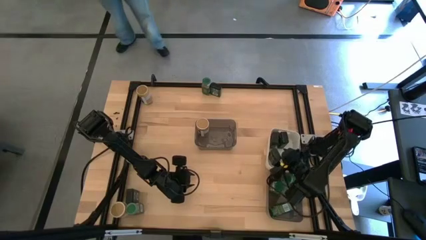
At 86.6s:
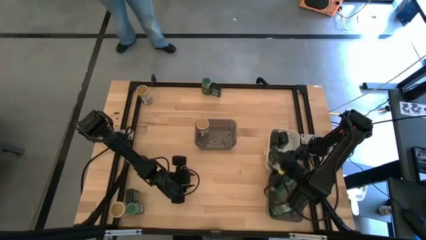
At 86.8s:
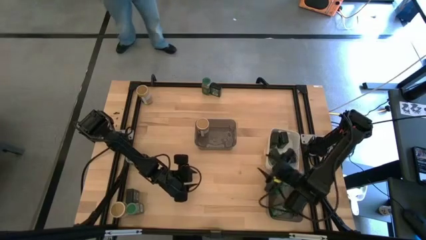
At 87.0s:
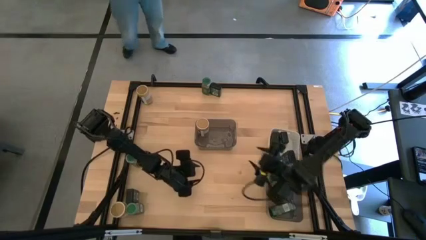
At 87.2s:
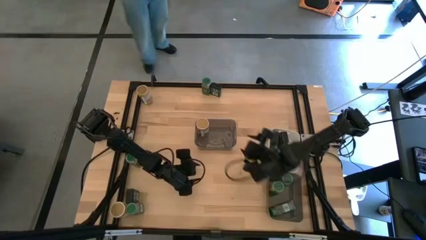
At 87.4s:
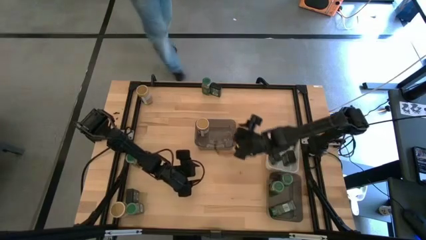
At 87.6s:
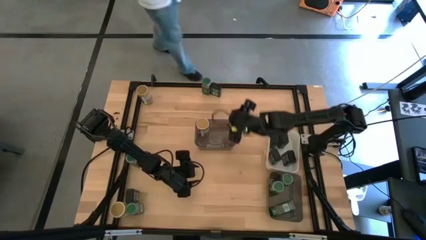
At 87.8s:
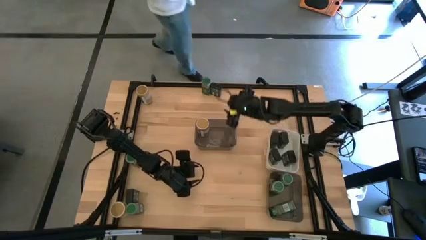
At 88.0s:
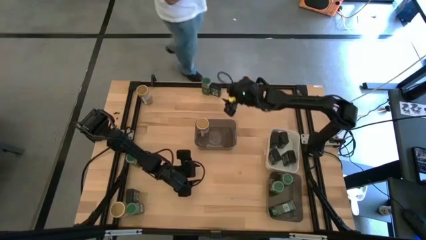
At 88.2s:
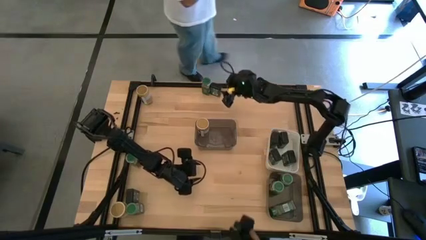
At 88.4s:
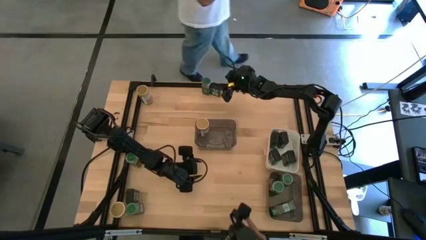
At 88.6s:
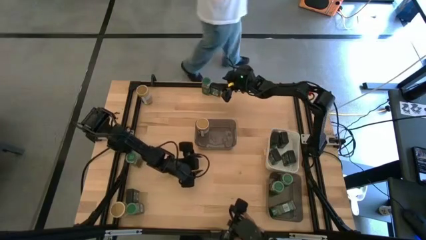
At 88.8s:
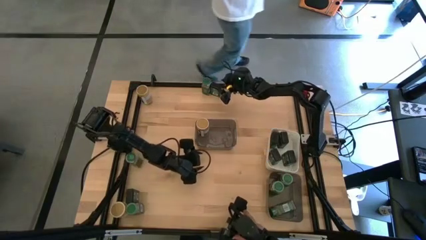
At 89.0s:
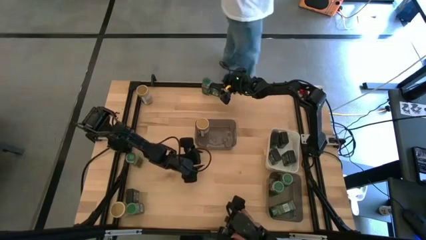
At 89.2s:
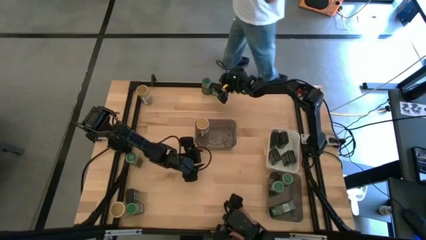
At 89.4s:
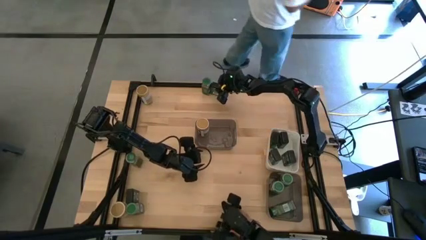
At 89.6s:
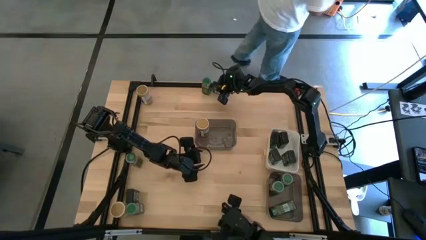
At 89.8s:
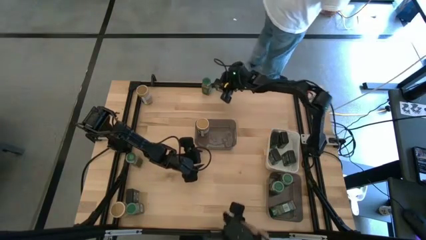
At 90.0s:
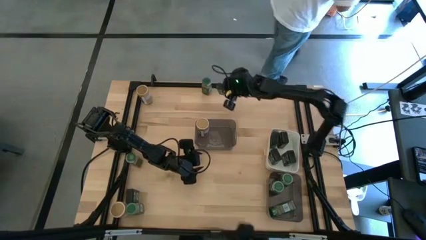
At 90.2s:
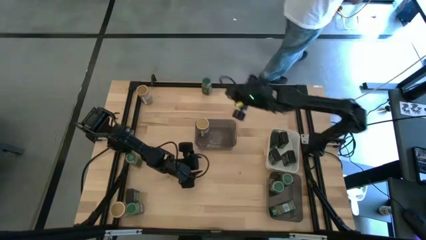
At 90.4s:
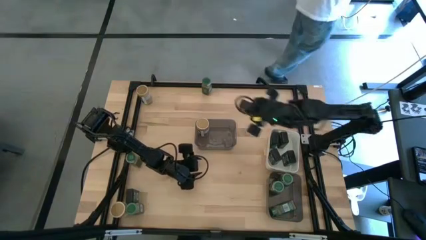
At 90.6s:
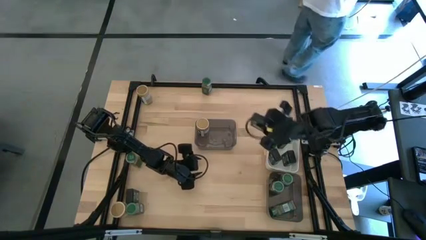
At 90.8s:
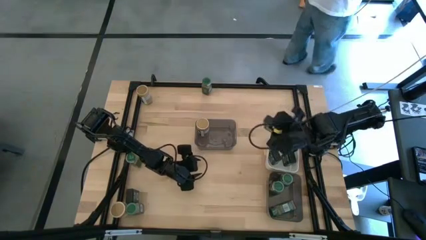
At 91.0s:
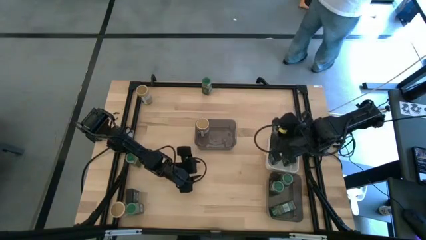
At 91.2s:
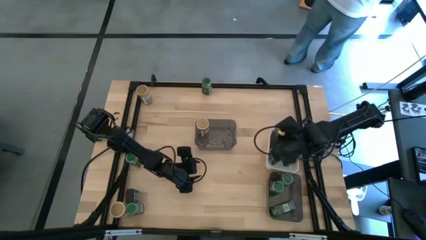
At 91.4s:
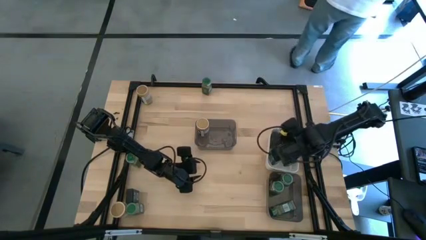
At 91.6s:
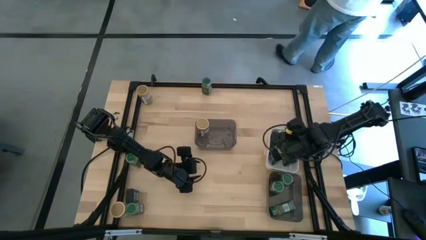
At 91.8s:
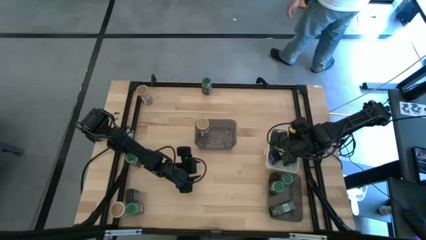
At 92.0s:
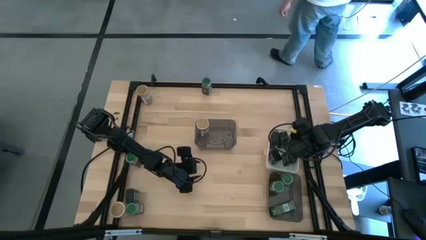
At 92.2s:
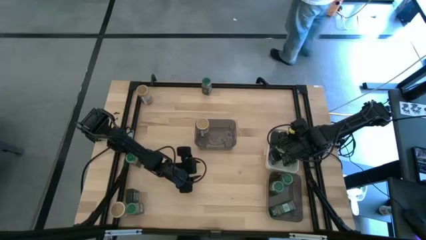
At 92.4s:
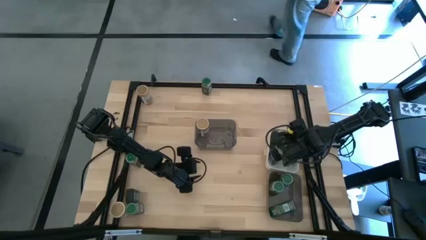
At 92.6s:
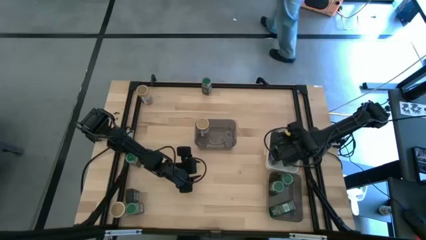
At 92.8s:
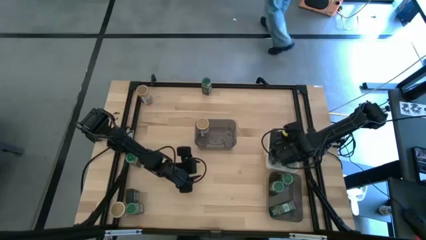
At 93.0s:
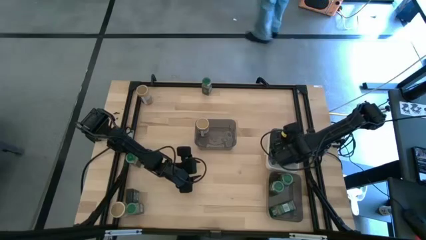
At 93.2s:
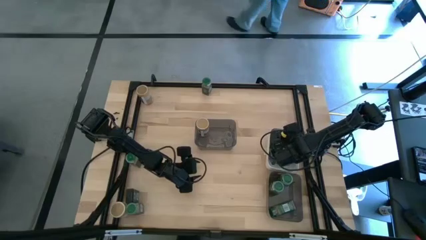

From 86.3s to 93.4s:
Task: Sort spices by type
Put the top black seasoning can into the white bin

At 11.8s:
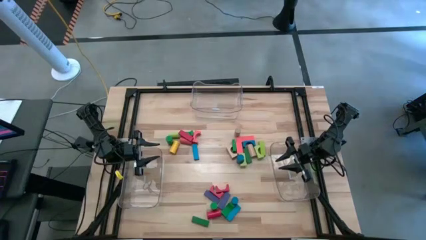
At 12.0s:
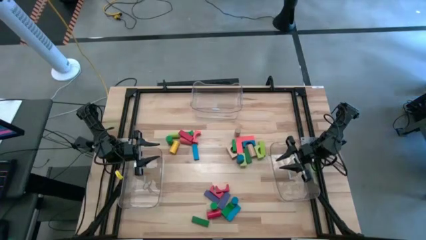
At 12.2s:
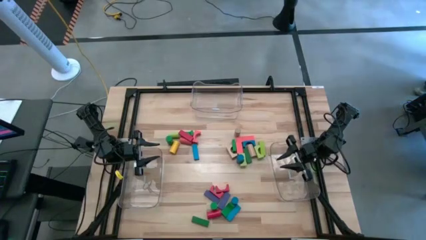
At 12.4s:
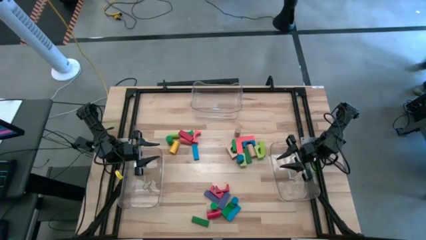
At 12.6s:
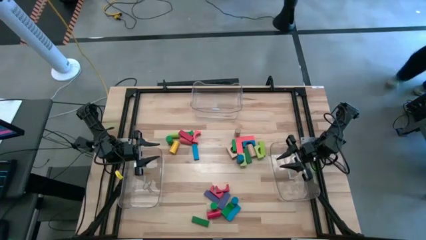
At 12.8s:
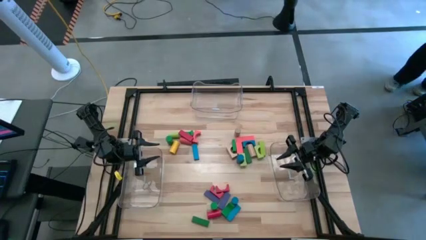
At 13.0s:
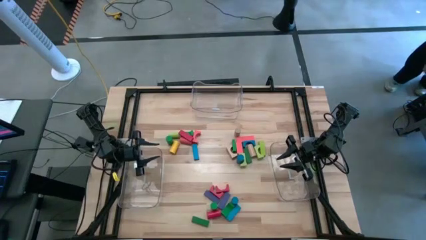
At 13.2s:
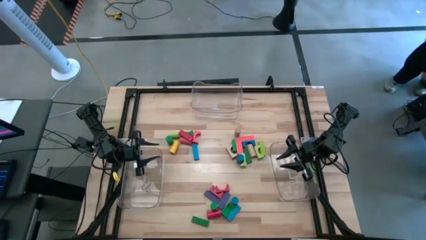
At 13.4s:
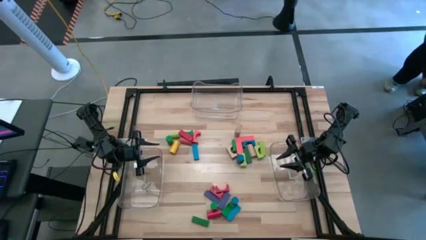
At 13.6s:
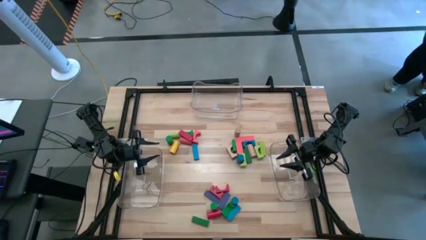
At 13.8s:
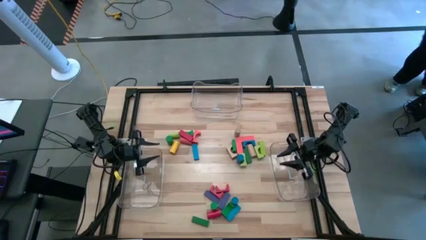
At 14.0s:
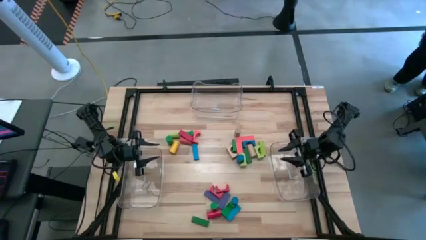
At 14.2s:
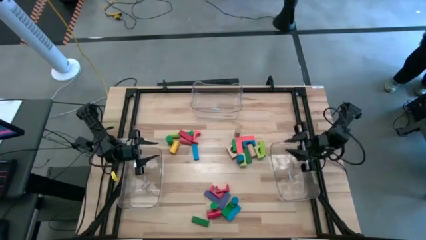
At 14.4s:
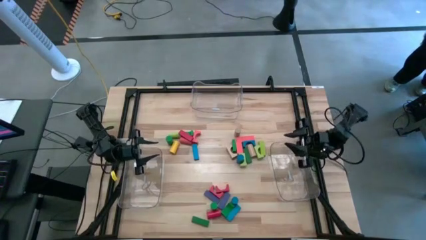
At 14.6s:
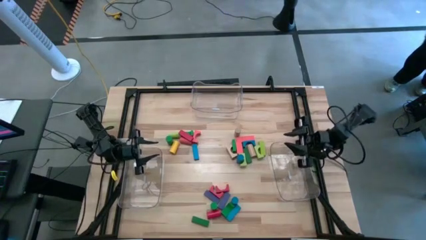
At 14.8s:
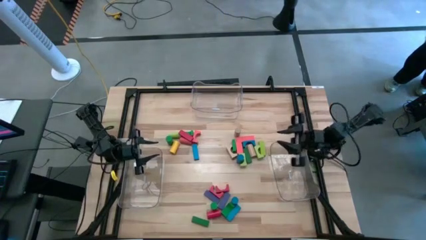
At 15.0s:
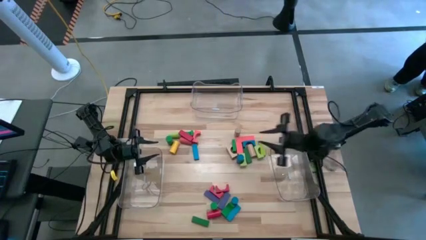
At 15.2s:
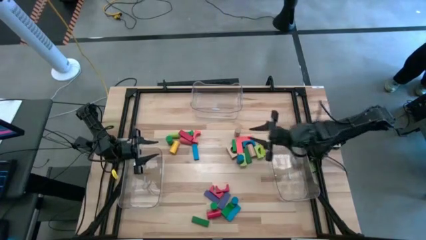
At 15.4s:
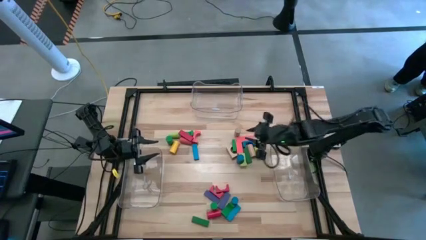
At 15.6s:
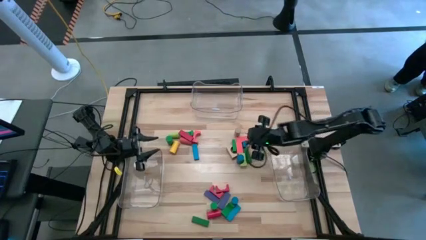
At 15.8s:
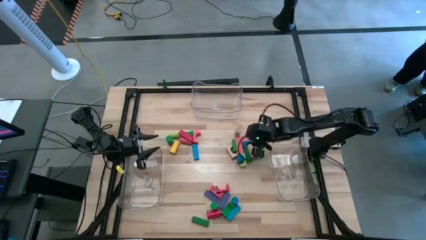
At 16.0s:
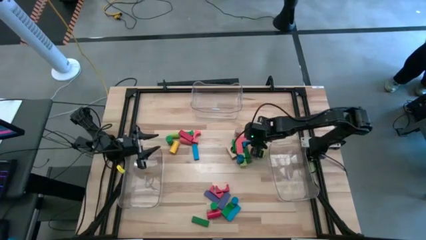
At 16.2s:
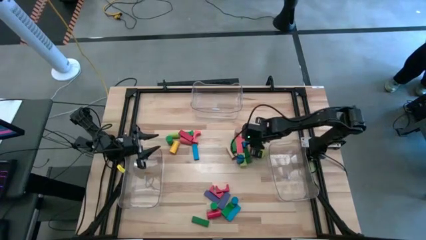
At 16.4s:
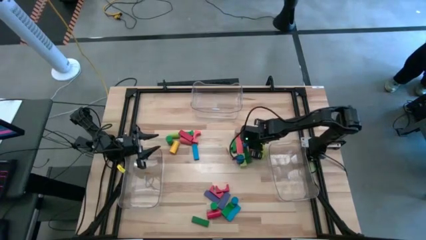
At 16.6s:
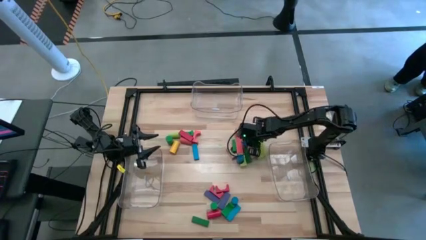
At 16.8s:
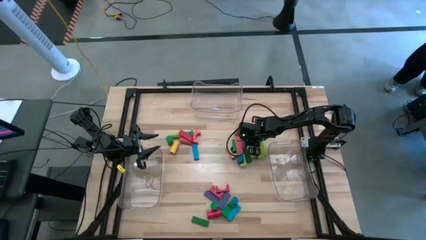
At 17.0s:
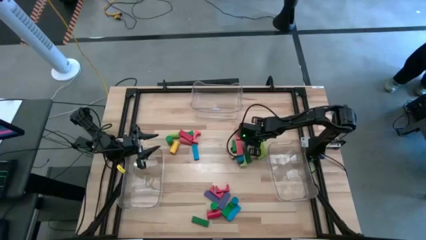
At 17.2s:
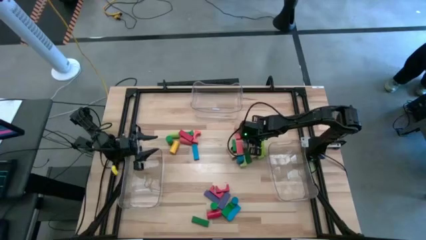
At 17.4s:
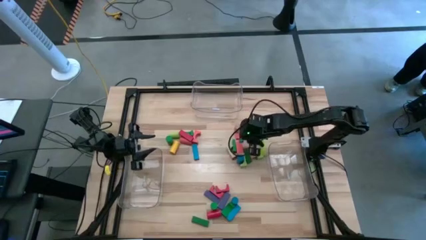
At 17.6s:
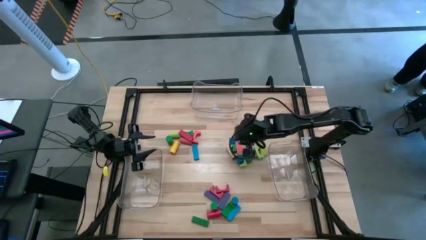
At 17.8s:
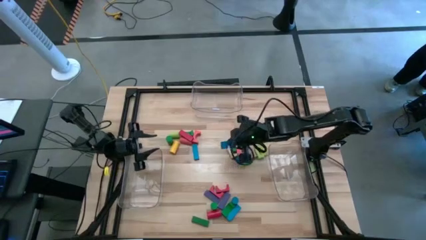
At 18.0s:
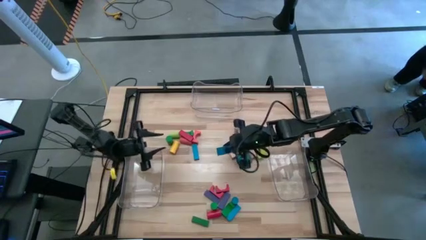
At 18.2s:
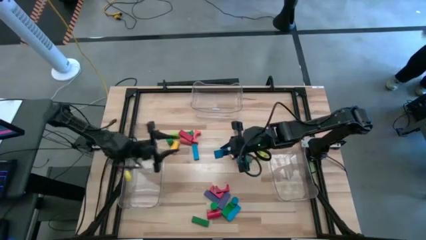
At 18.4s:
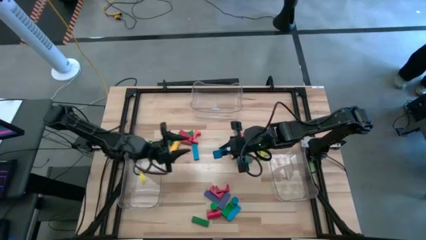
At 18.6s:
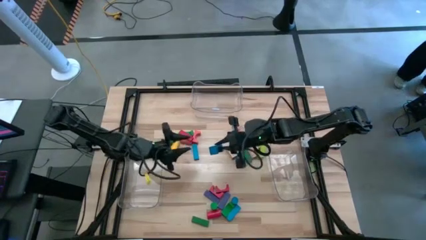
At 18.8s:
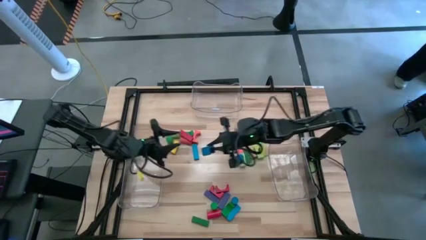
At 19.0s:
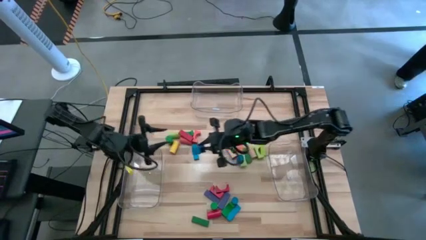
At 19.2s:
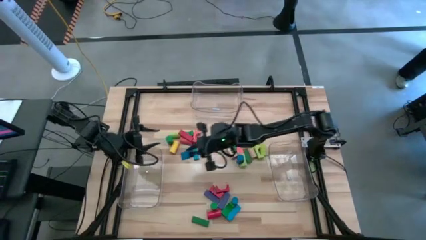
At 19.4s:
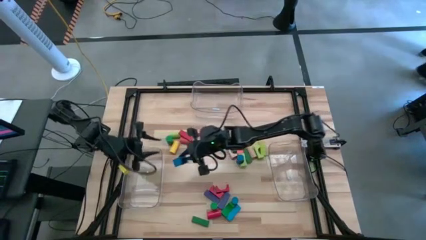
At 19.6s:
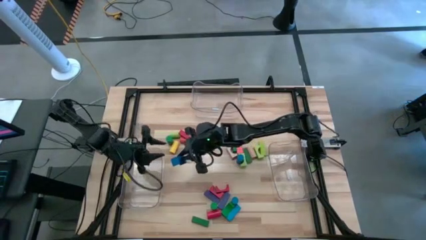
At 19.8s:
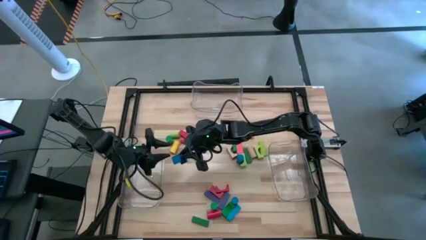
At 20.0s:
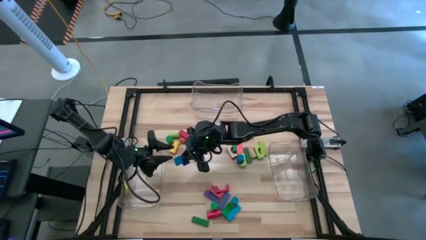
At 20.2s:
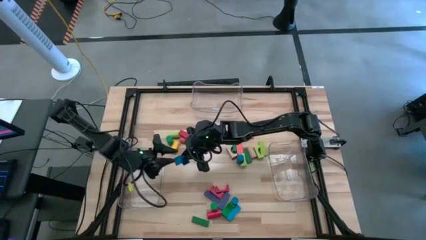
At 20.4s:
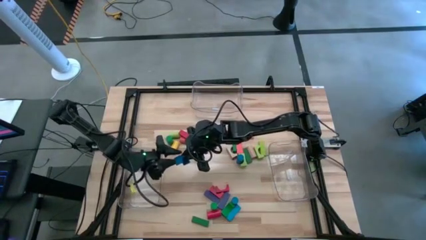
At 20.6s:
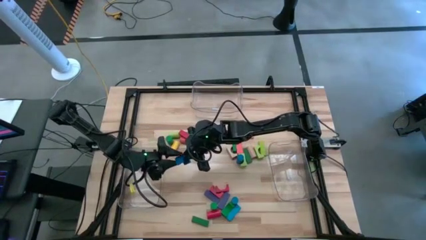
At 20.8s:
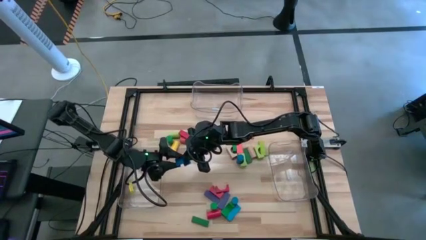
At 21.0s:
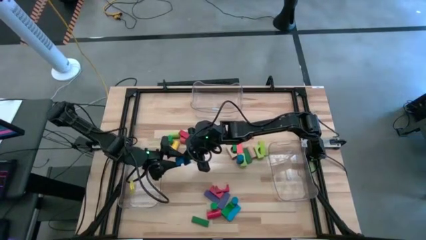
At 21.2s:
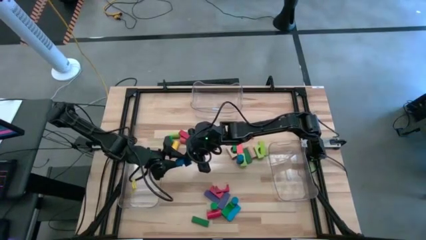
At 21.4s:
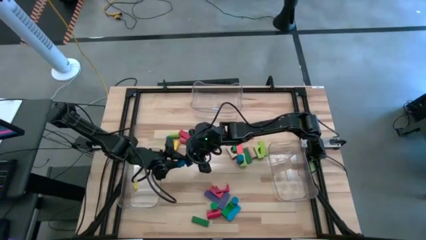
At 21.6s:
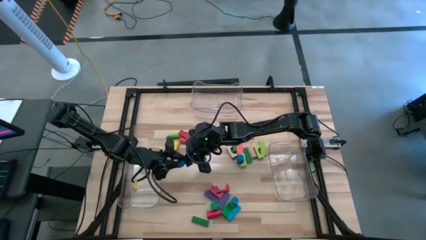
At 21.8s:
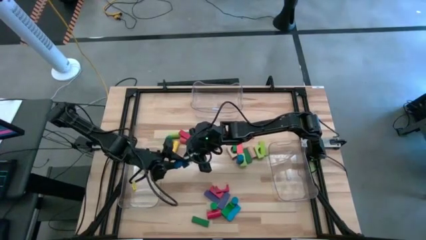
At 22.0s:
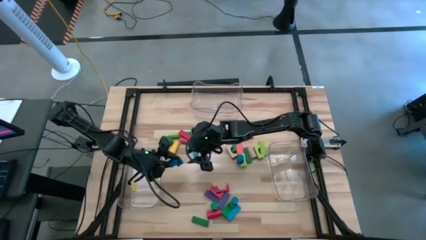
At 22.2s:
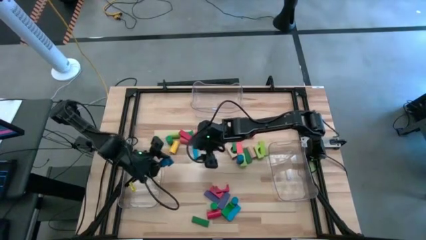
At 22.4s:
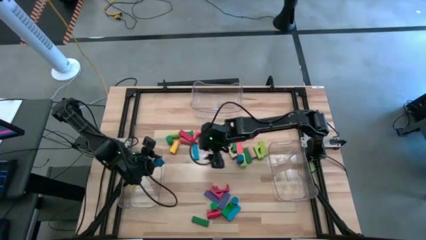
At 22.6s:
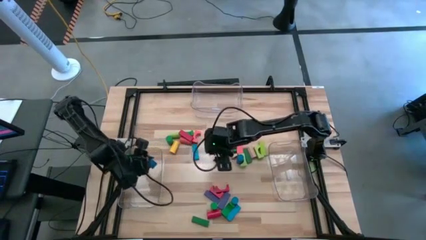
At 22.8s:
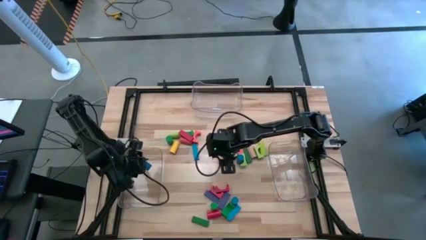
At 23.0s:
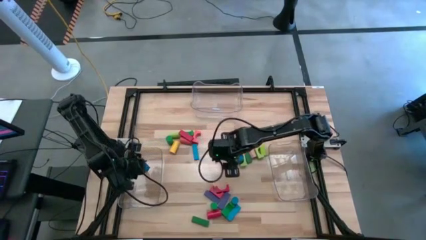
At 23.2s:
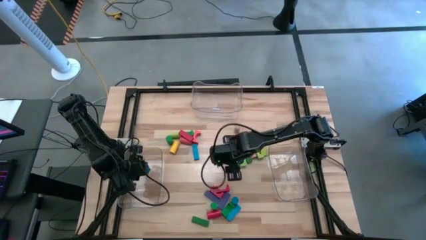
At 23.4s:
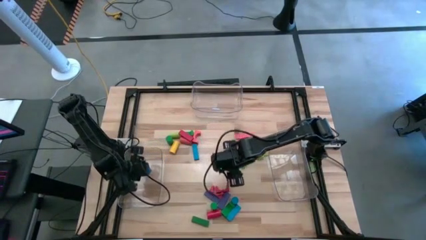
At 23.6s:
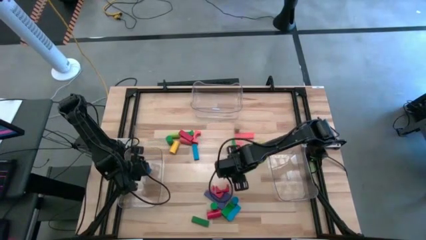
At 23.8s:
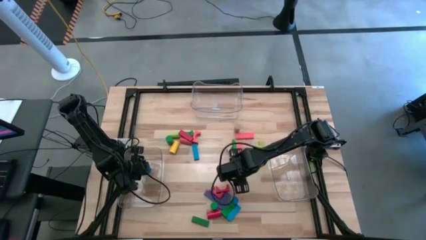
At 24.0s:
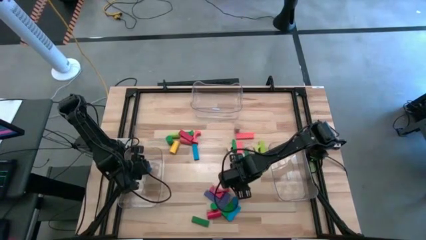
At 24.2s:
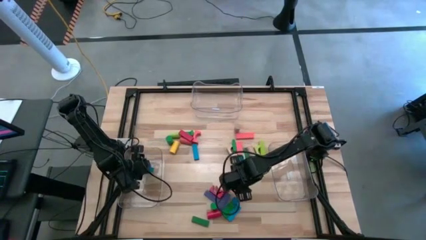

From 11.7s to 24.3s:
Task: Sort blocks by size
Put the blue arc block into the left transparent bin
